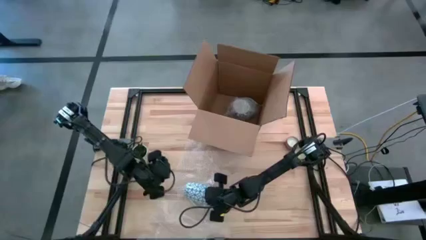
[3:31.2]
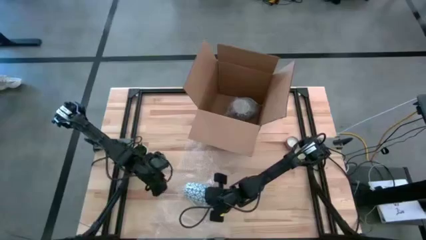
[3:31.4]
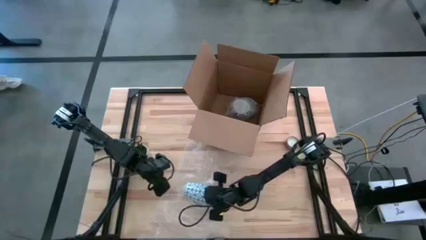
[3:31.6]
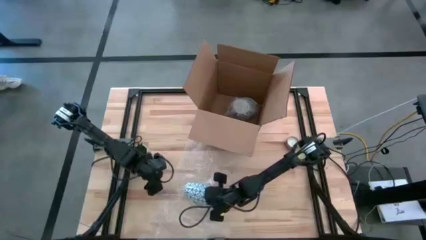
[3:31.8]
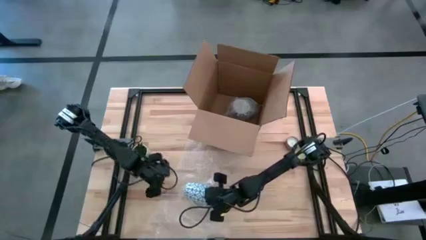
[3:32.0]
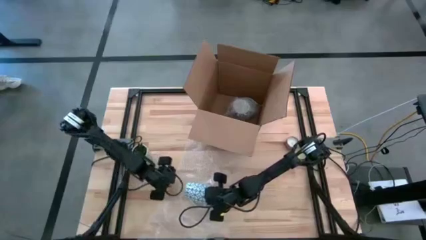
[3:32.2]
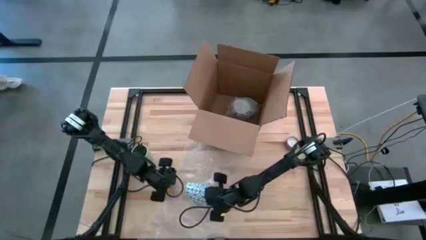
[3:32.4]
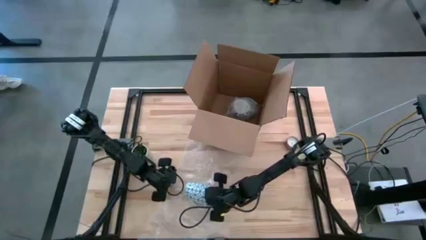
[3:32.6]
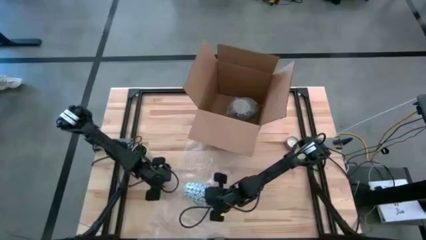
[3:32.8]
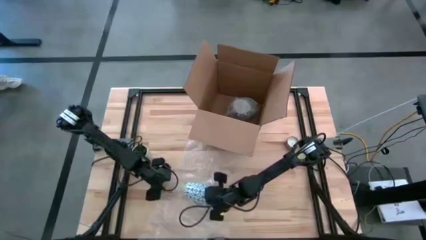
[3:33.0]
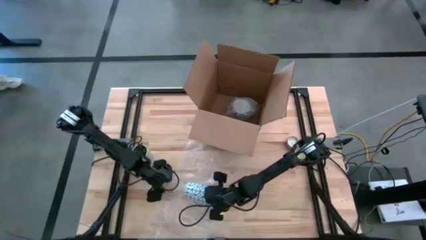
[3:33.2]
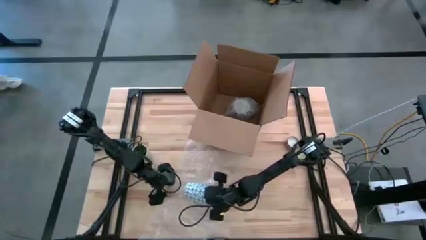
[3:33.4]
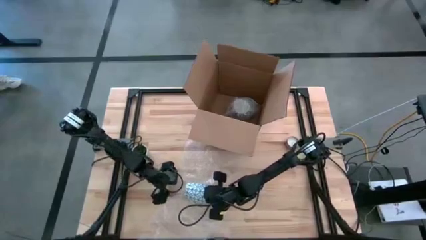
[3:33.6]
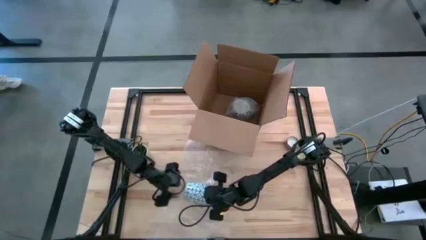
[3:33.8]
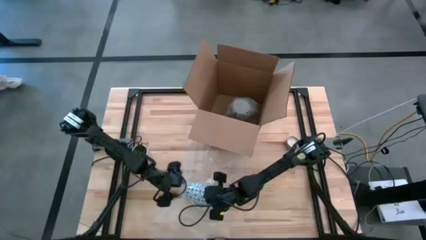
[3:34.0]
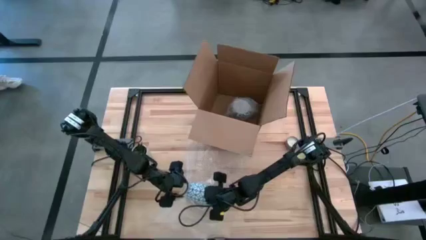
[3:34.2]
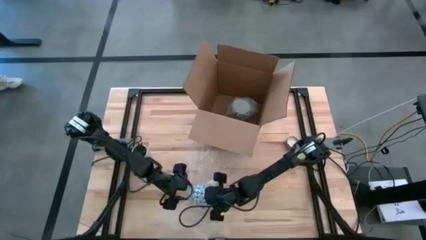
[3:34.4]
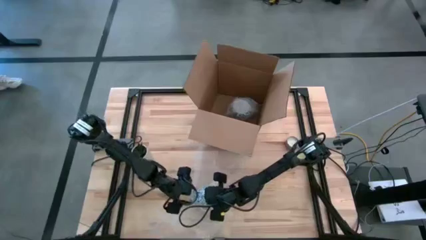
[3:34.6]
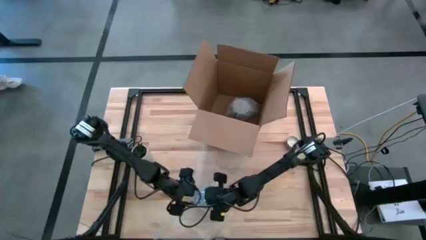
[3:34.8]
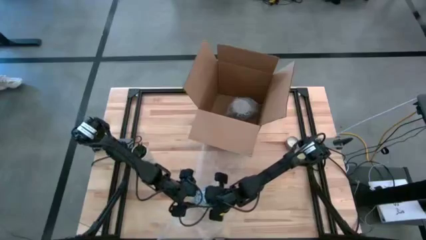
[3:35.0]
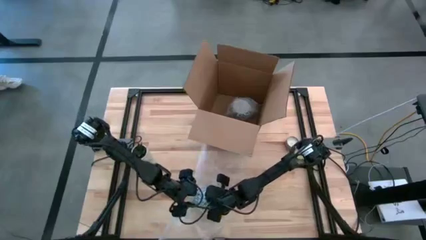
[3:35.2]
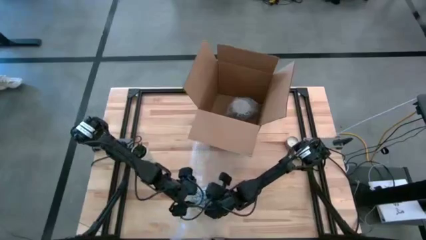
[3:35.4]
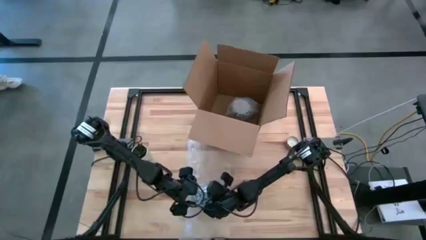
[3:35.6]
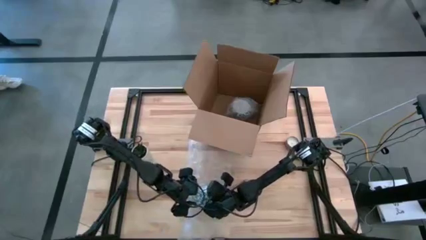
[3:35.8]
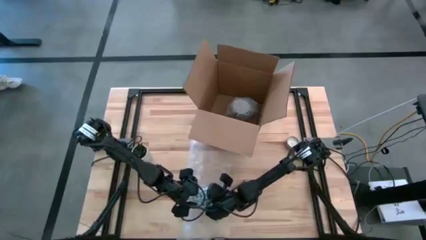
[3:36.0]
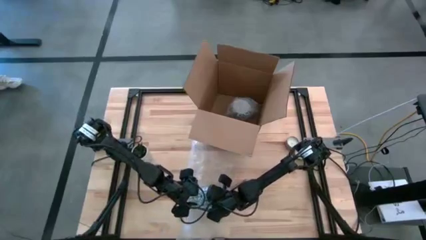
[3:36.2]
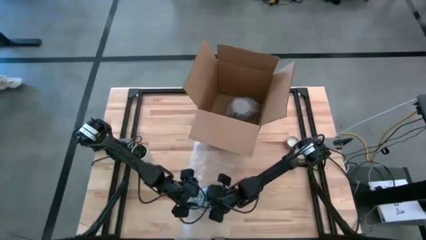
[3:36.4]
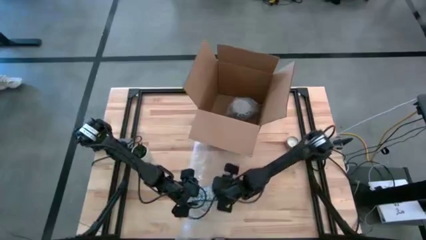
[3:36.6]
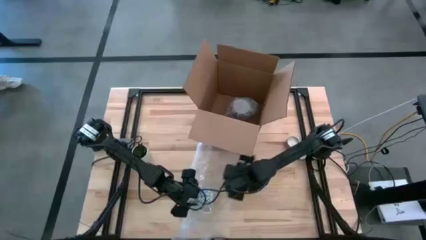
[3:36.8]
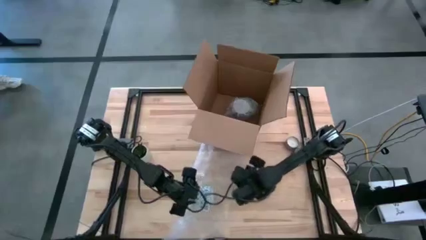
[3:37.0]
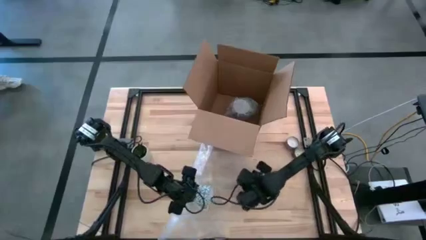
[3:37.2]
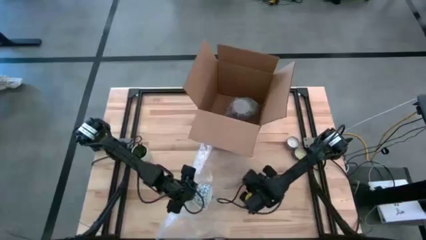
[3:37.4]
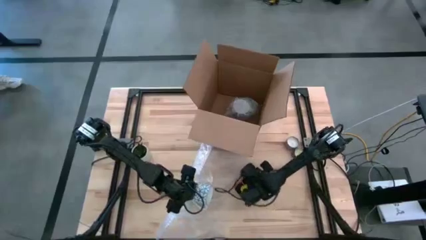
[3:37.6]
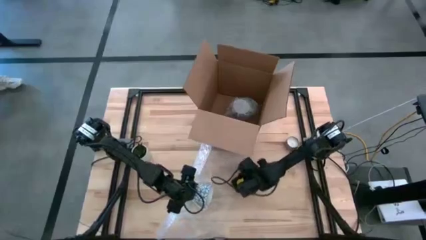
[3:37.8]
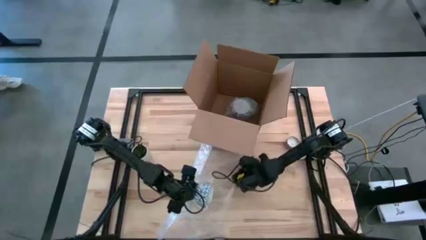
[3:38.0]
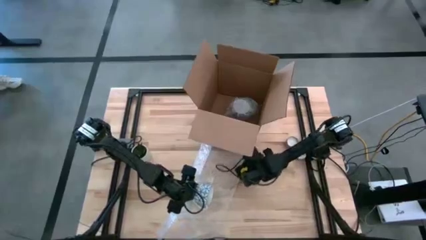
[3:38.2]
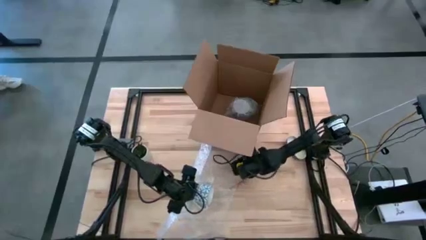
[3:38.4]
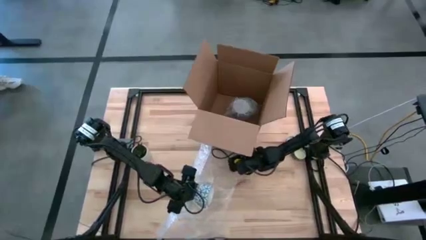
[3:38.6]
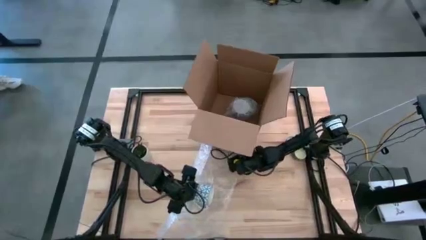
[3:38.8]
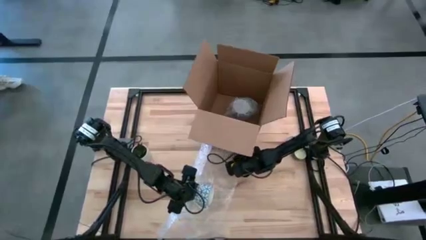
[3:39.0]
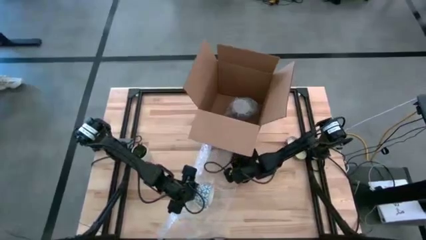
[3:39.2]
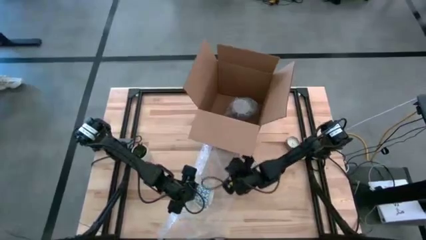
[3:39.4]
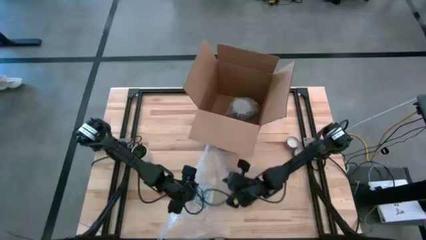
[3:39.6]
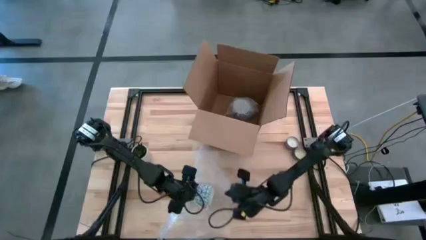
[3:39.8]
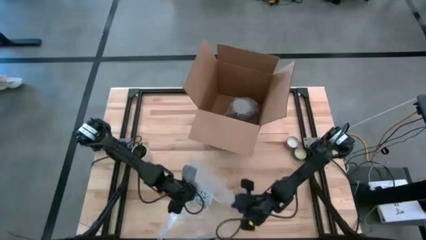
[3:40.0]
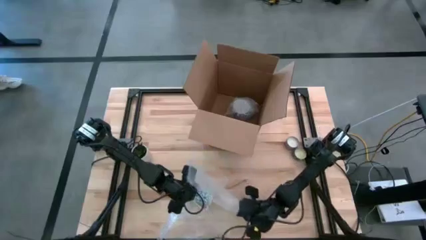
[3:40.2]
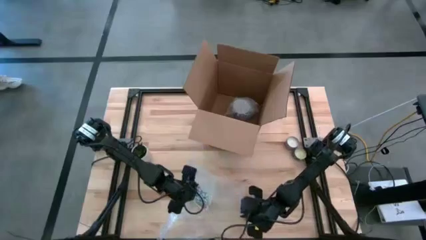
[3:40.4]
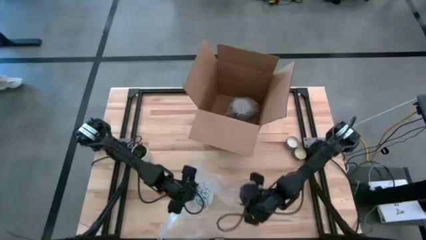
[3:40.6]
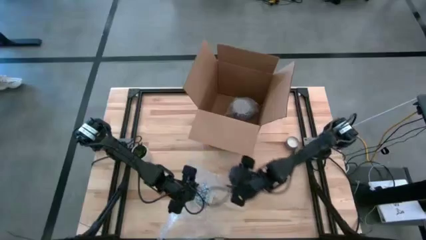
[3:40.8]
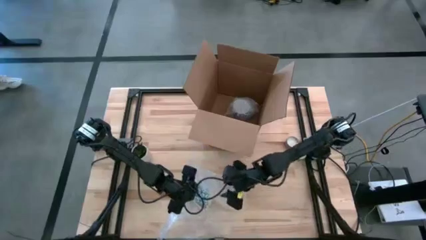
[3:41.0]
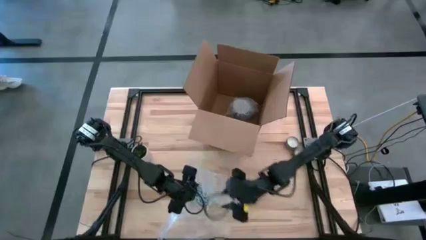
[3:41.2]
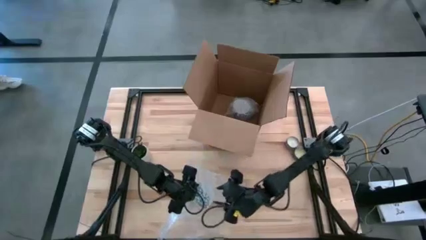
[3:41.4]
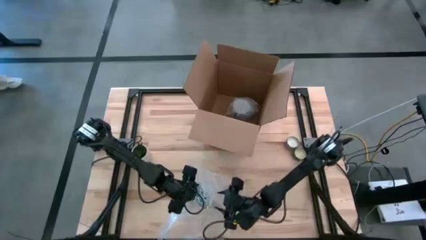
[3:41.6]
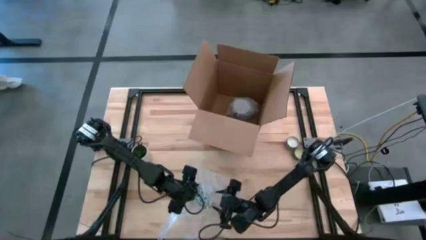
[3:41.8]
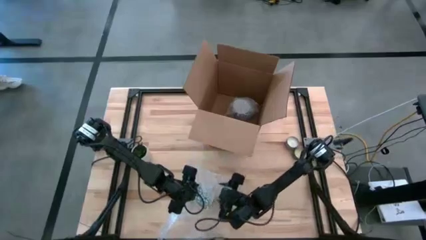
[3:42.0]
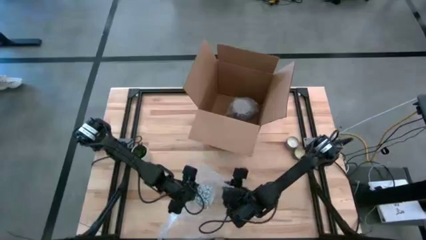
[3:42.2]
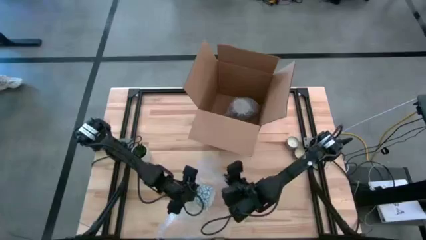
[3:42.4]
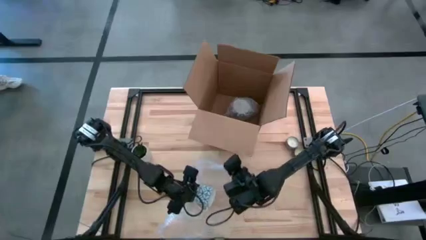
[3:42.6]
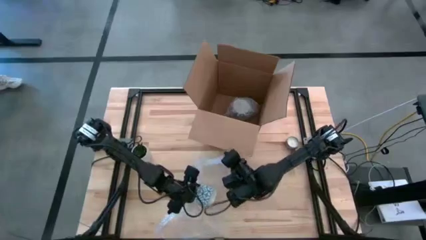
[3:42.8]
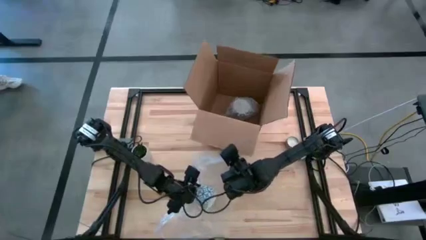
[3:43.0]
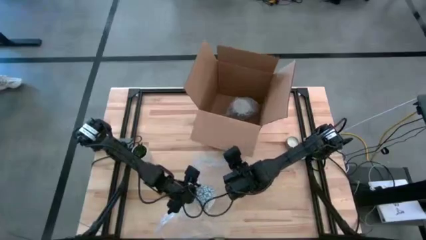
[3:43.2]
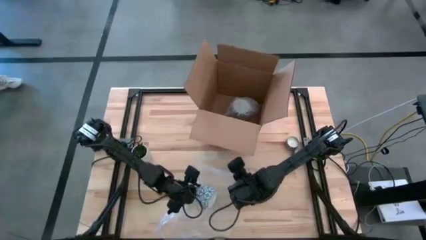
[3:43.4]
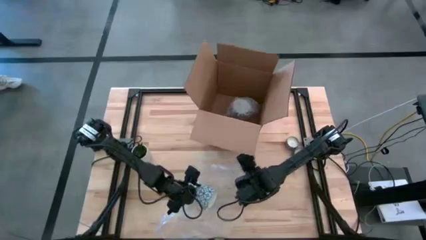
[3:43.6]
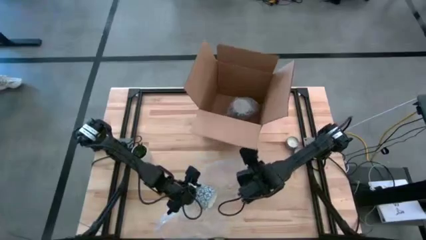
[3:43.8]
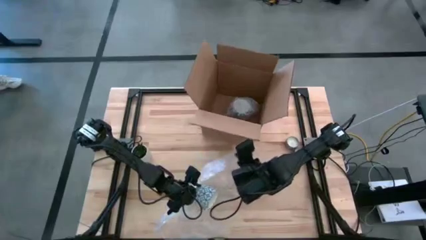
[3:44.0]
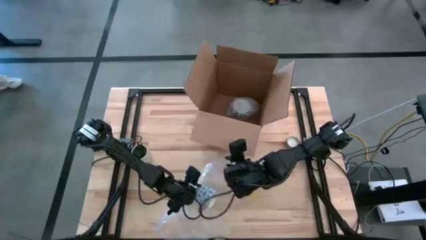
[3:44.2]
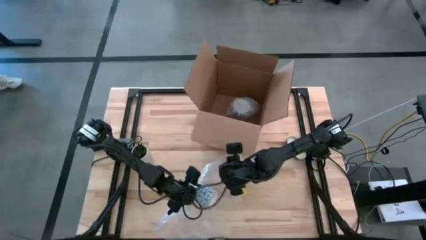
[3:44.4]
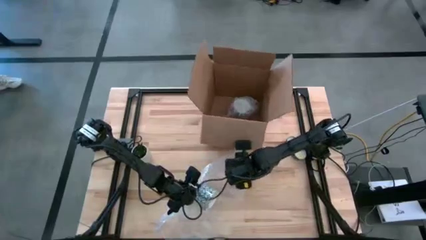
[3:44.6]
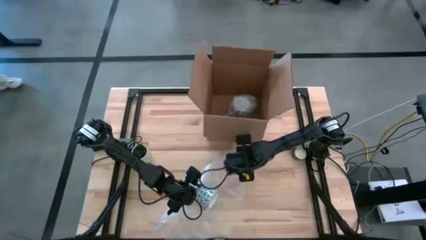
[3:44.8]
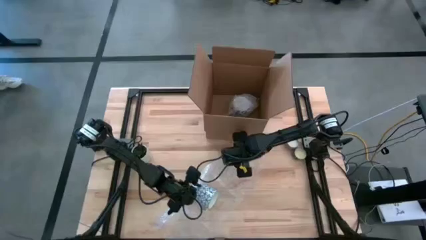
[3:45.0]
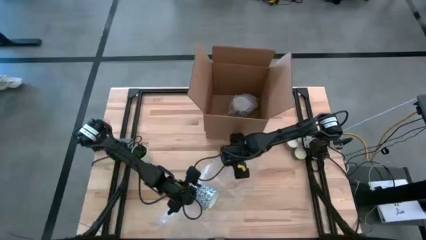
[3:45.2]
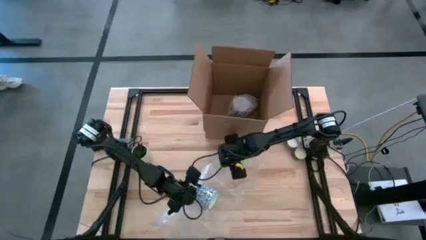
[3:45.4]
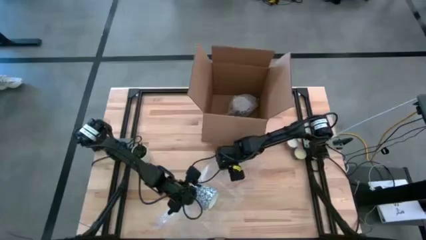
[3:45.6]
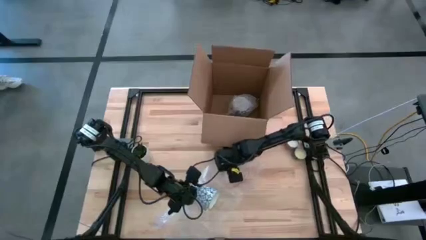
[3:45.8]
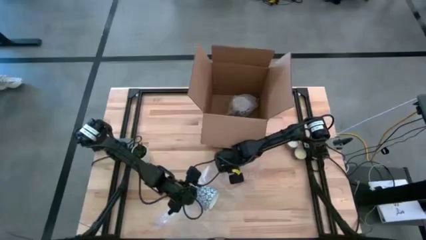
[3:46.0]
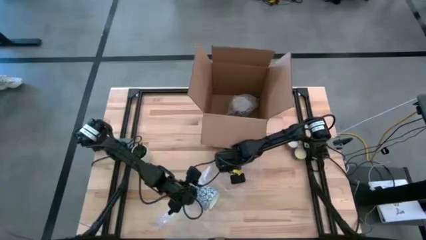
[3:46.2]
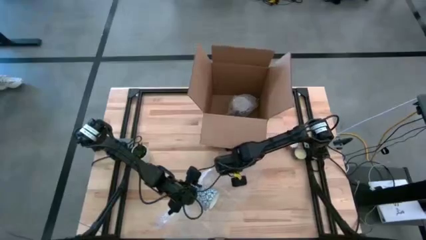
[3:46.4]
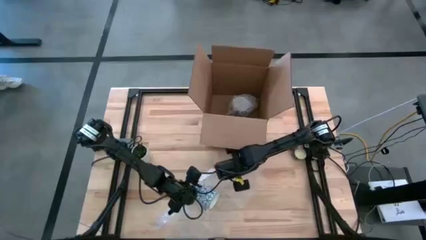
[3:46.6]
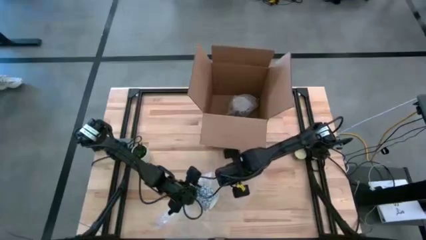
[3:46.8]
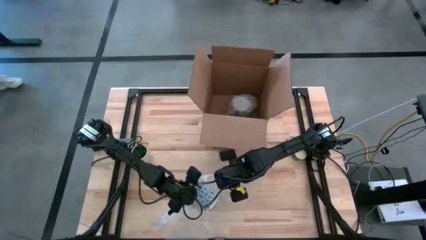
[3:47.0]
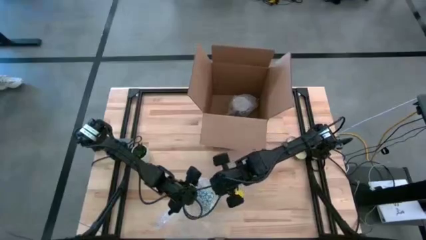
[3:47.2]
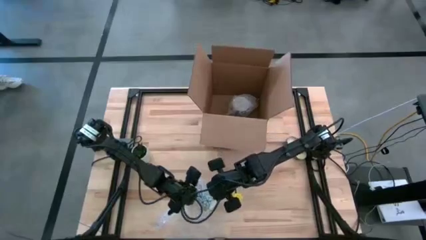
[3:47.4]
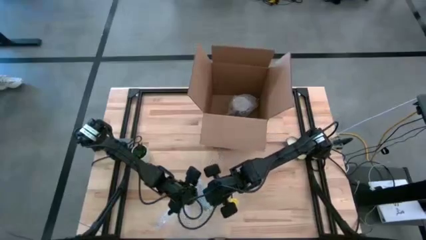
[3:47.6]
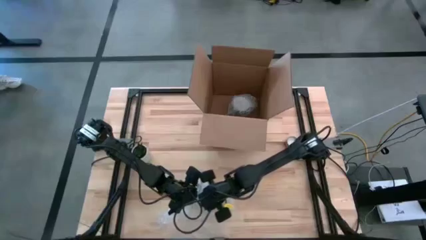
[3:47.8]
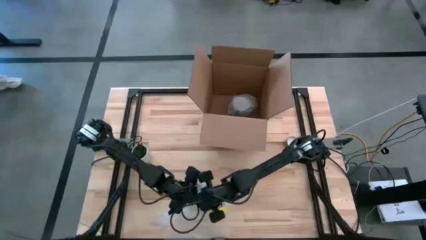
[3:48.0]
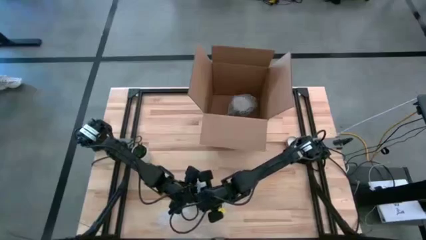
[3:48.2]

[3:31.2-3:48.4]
Task: wrap mug
Wrap the blue patterned mug with the bubble wrap
